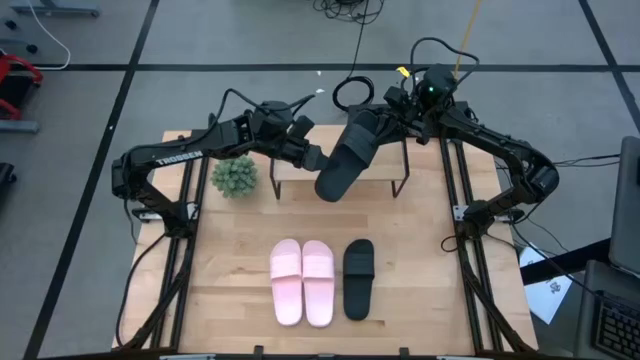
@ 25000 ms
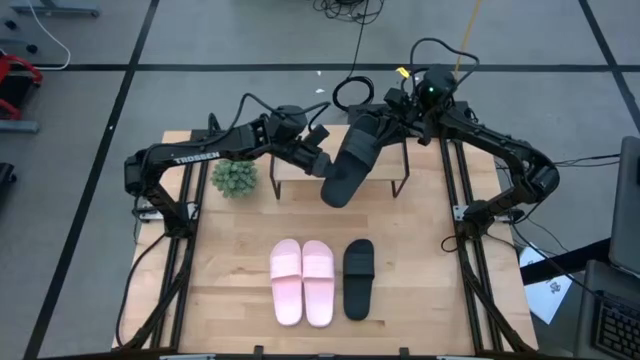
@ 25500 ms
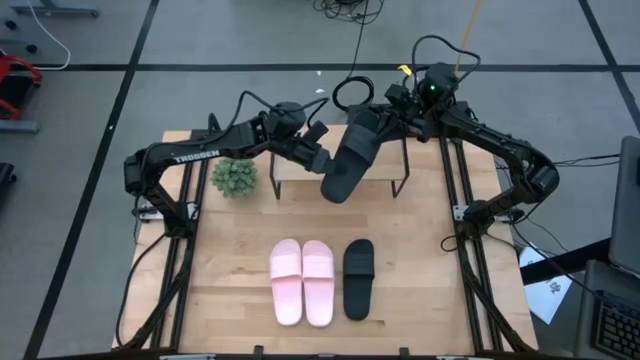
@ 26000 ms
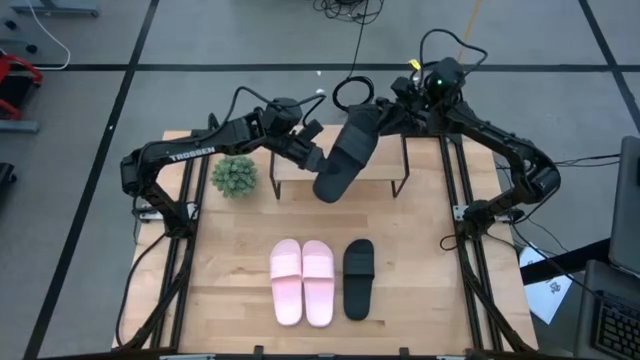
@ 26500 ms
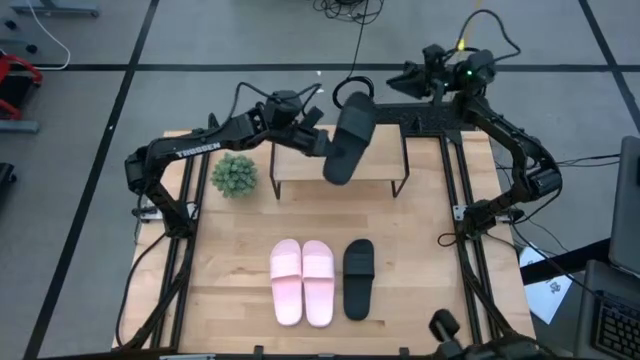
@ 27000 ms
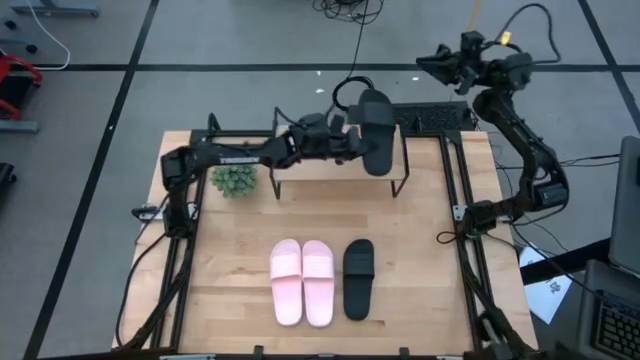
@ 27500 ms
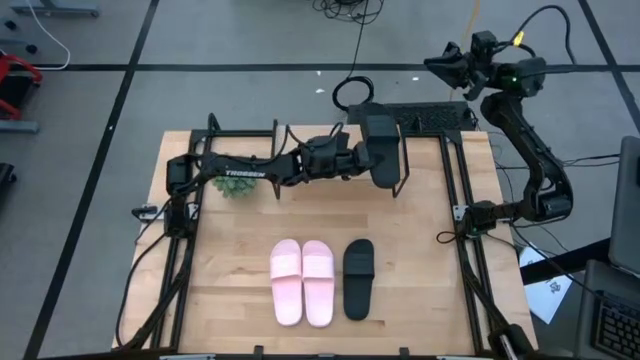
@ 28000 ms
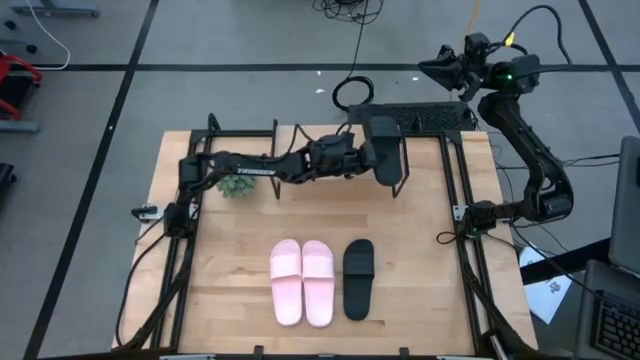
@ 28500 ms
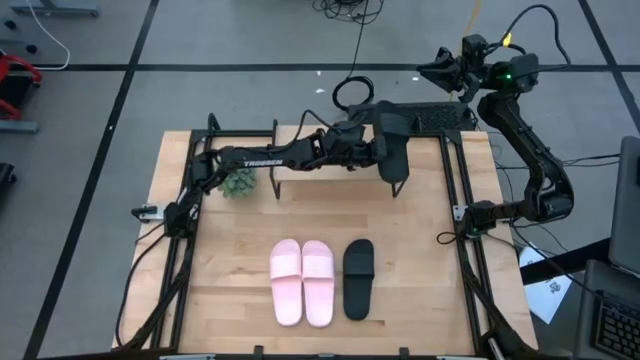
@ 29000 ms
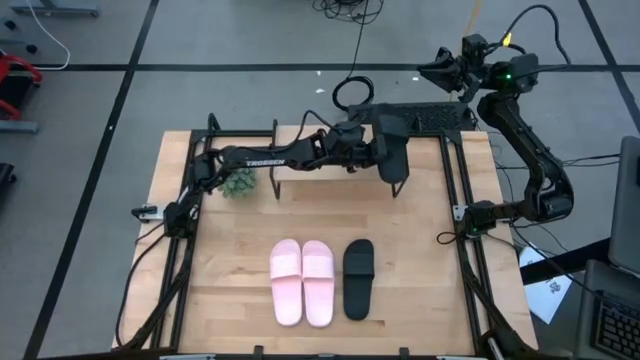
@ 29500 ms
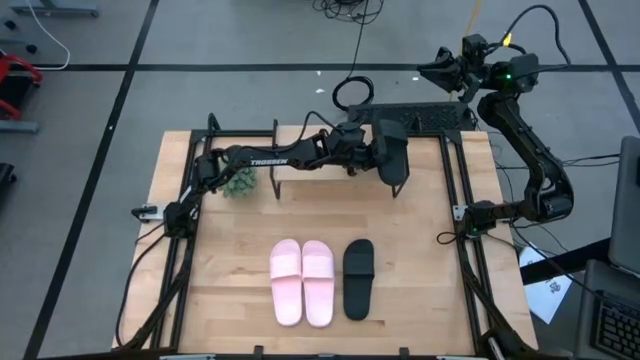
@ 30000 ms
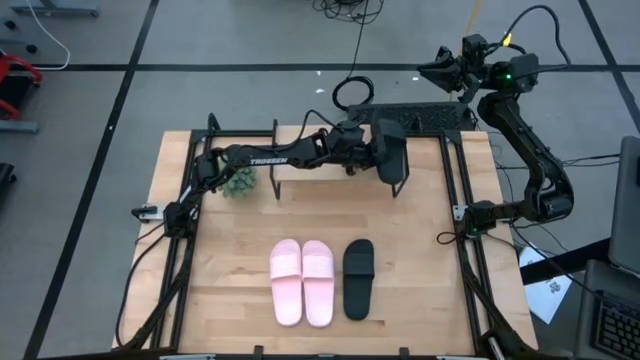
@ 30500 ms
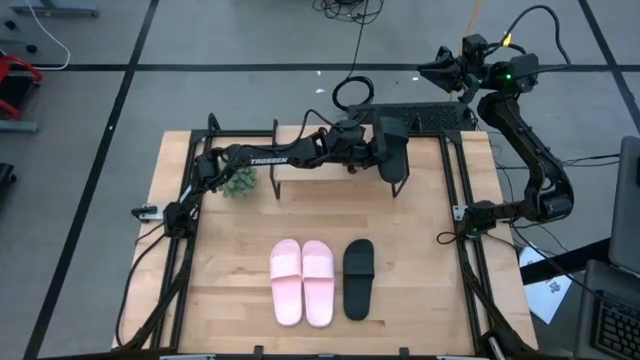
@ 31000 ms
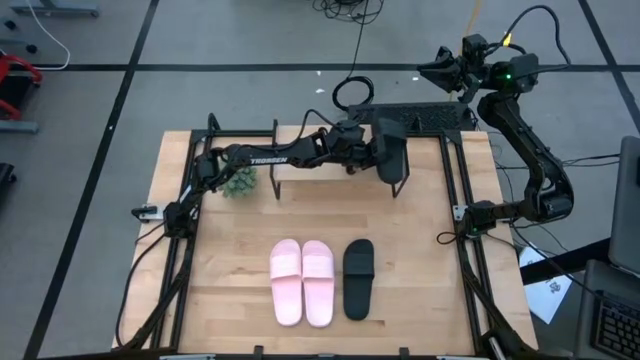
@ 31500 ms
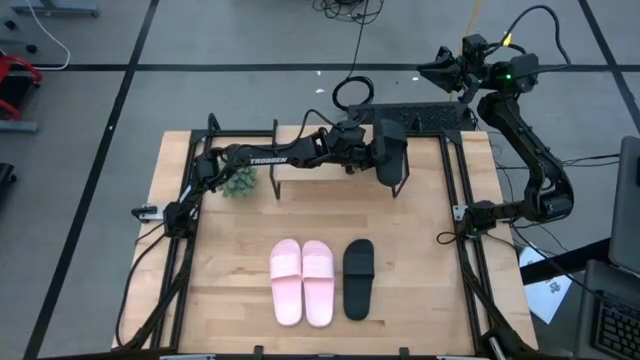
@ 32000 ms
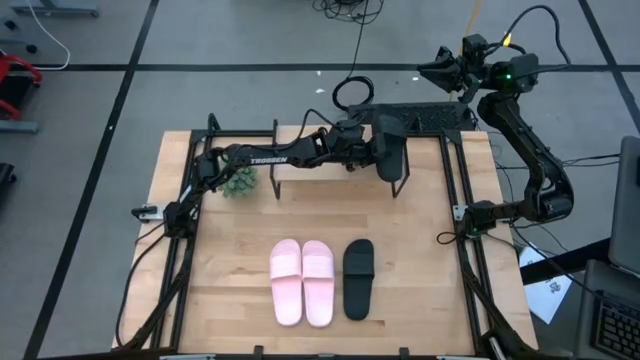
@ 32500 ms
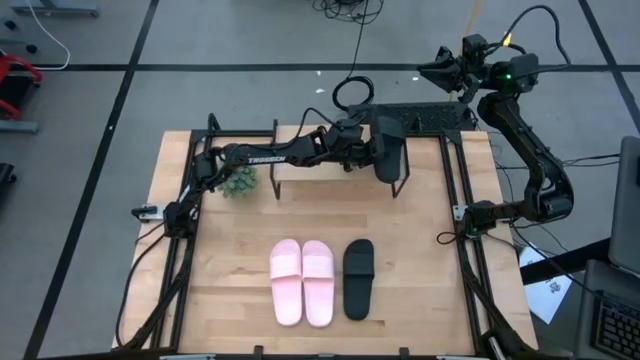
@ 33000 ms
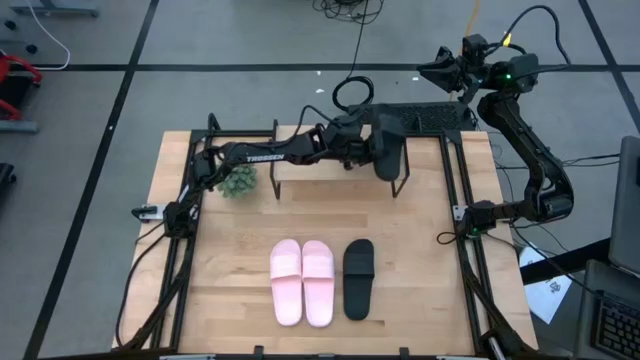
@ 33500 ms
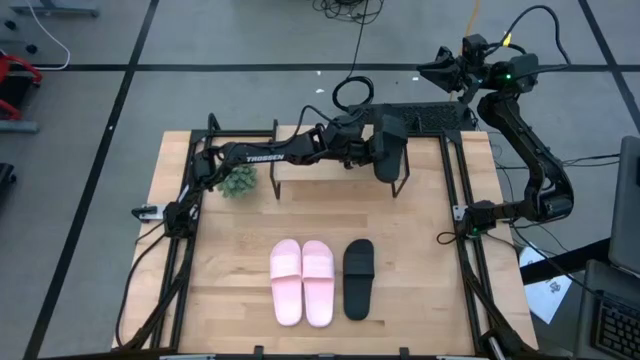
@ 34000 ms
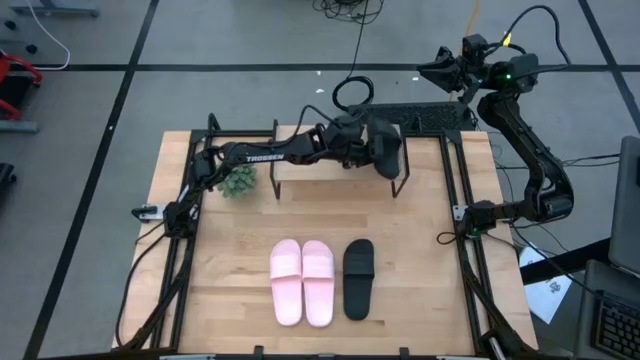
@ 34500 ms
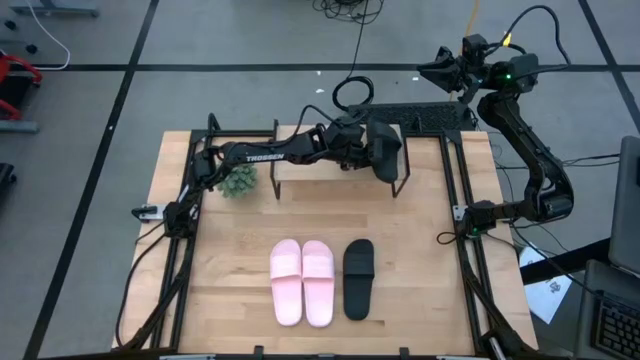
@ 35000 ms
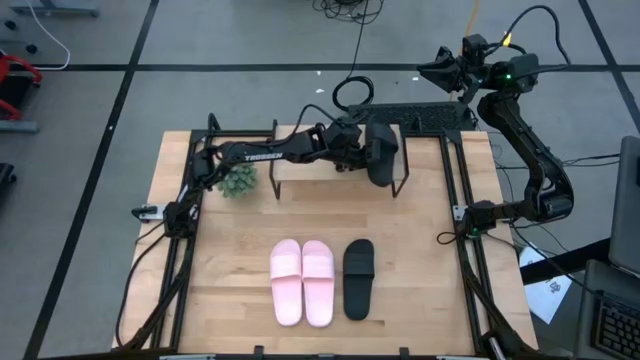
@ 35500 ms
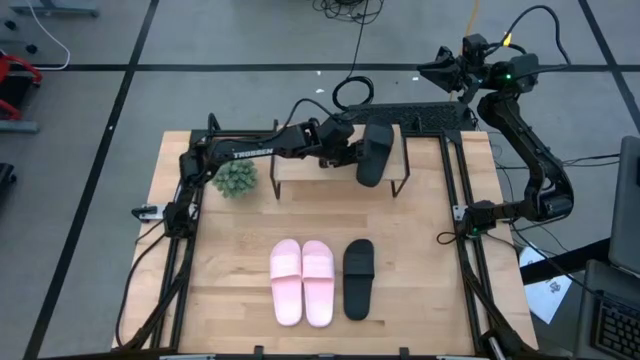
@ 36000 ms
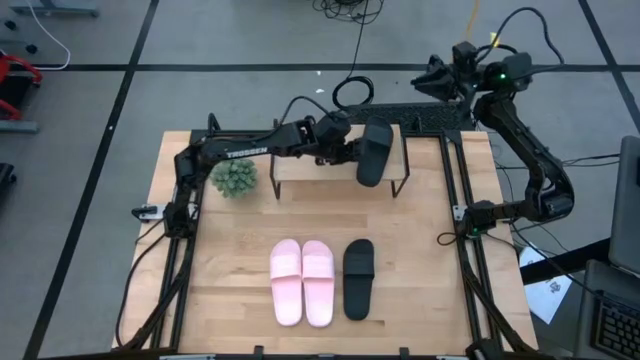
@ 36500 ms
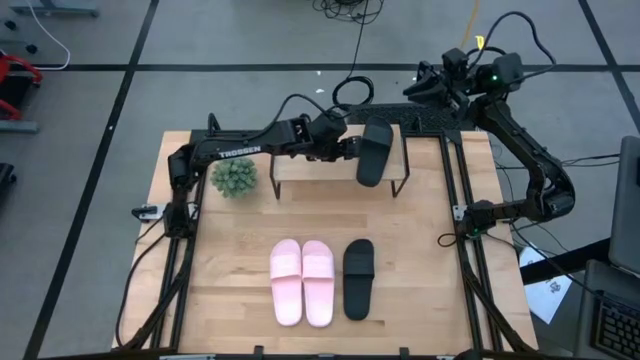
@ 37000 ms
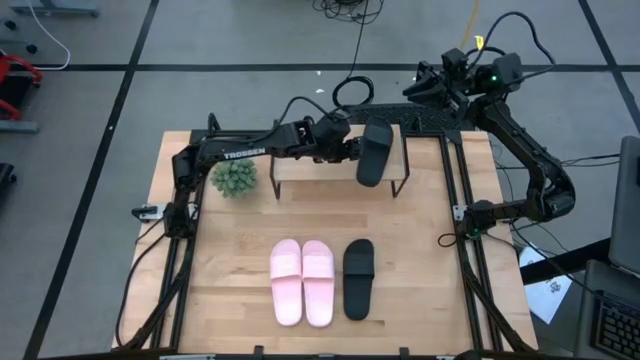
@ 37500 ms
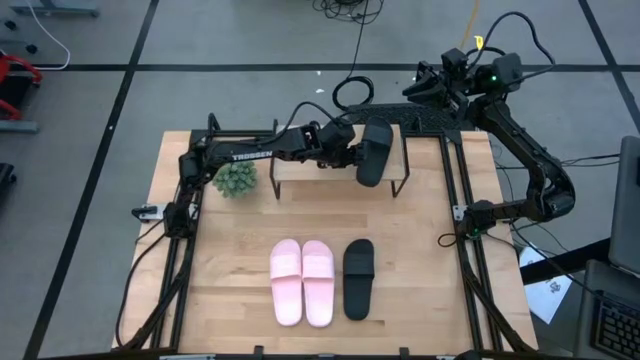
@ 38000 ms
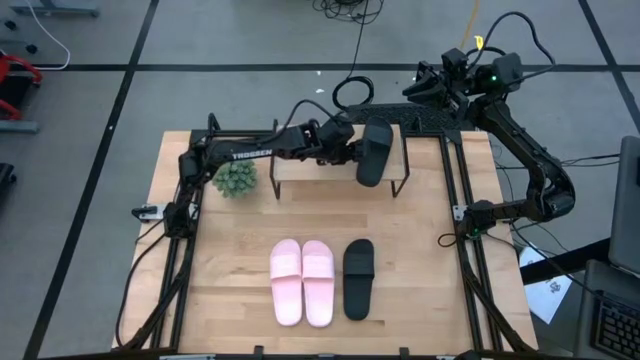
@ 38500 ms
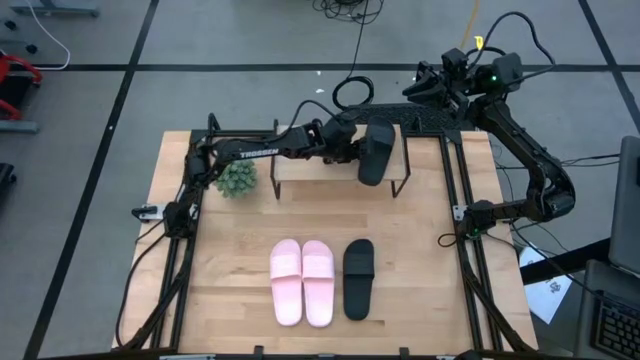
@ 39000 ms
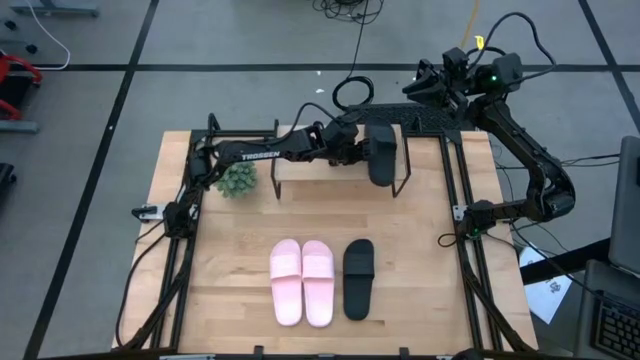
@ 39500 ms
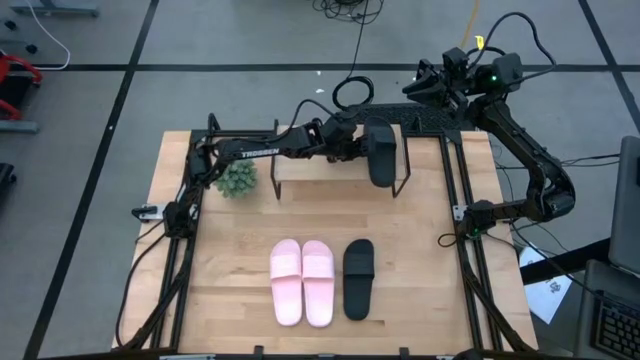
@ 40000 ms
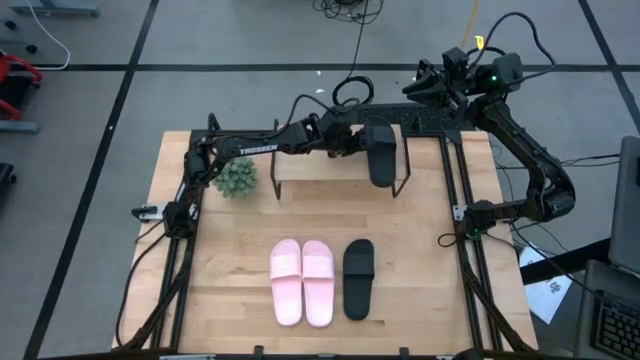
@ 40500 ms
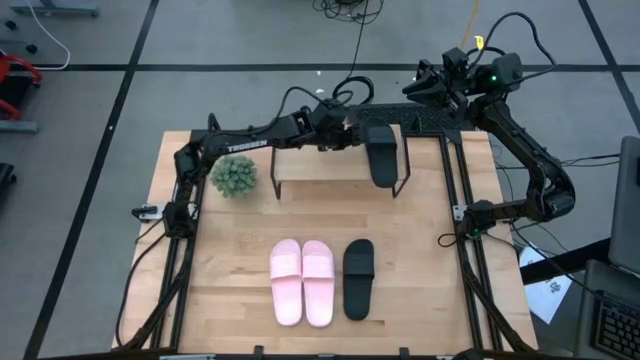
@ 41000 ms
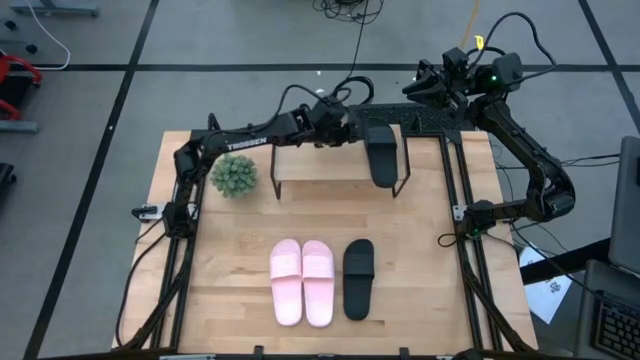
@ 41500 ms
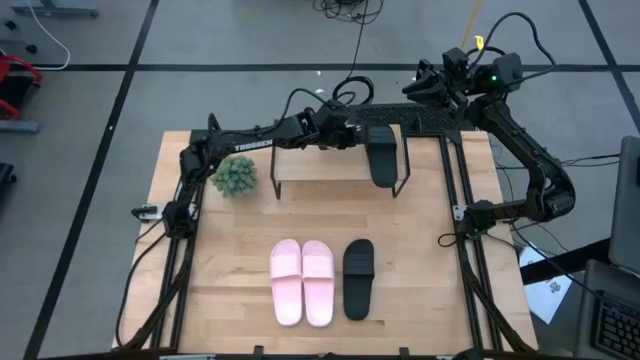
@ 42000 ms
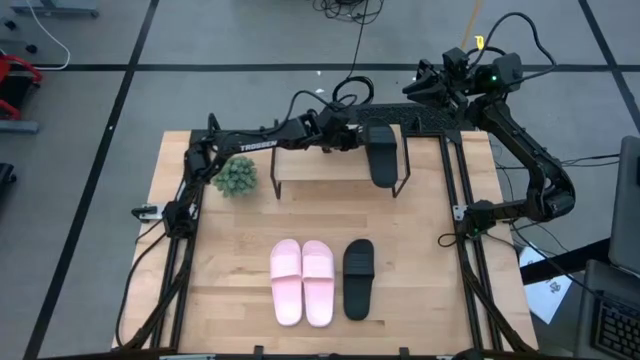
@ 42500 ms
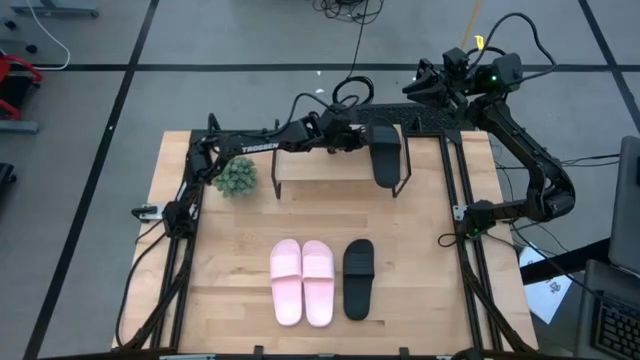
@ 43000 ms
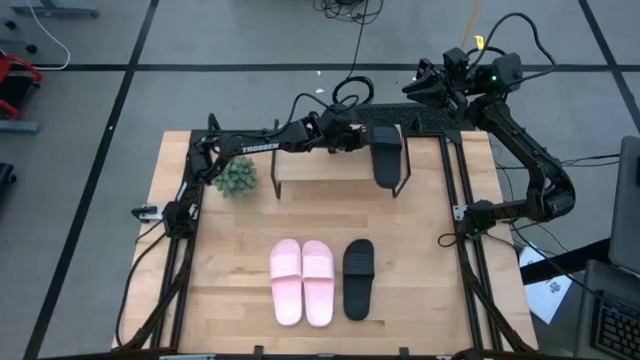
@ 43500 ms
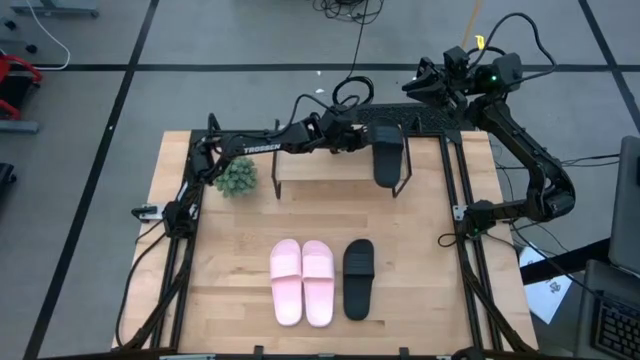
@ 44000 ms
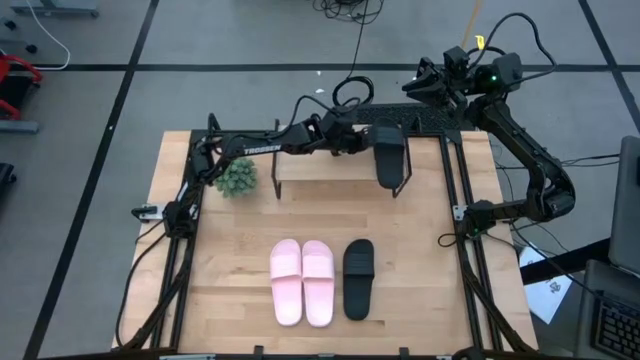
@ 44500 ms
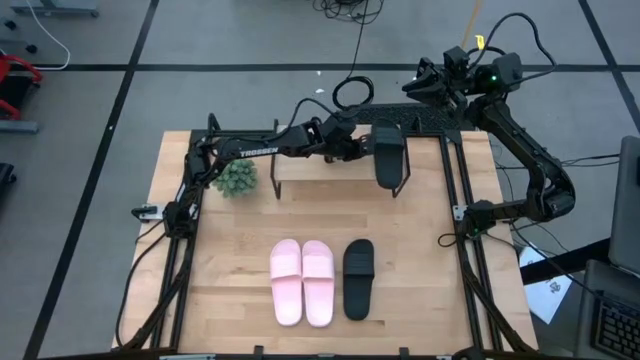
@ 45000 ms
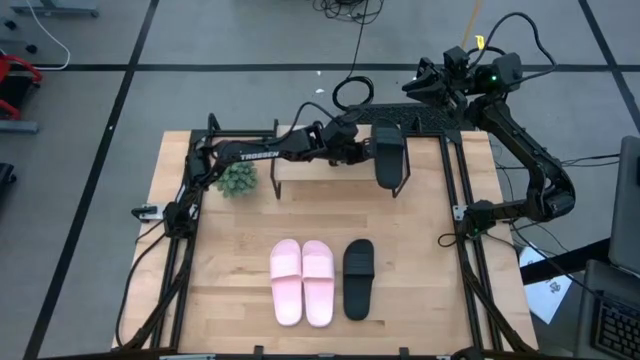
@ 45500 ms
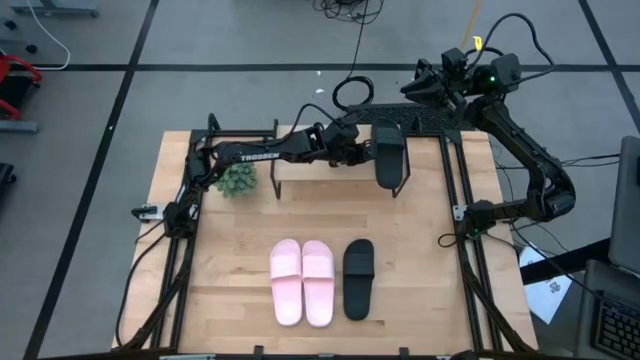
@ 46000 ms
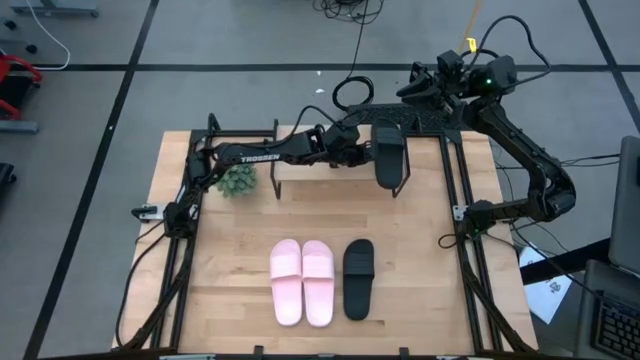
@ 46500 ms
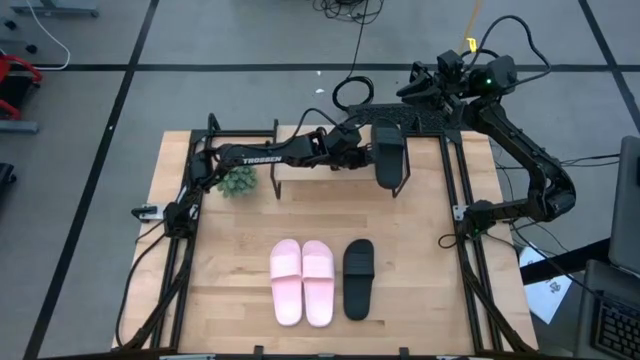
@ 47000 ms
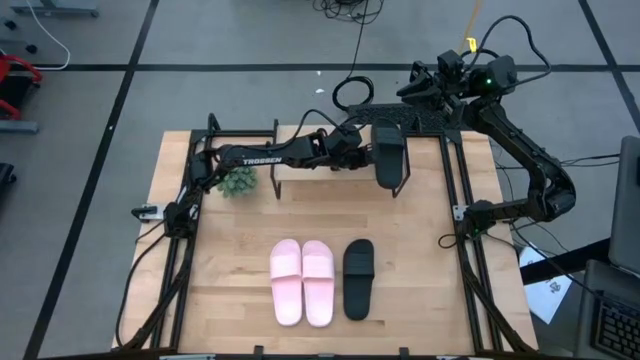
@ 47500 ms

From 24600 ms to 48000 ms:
Task: Pick and place slides into the shelf
Put the right black slipper on the shelf
